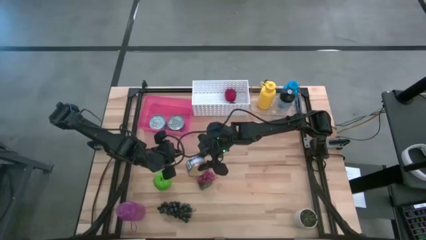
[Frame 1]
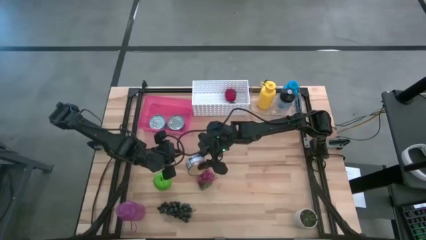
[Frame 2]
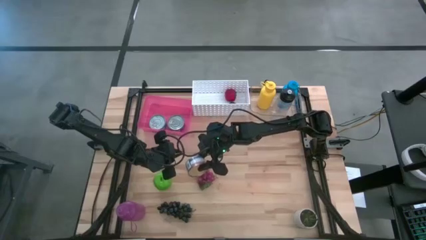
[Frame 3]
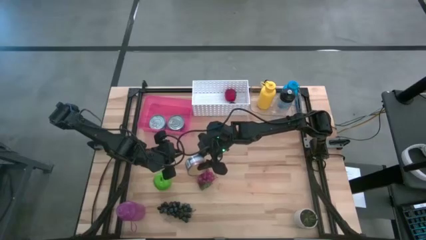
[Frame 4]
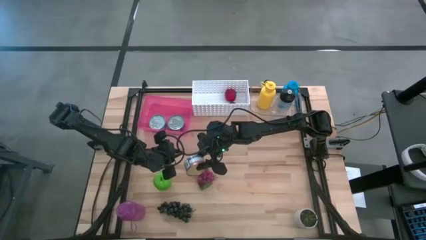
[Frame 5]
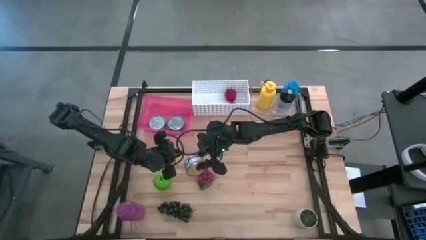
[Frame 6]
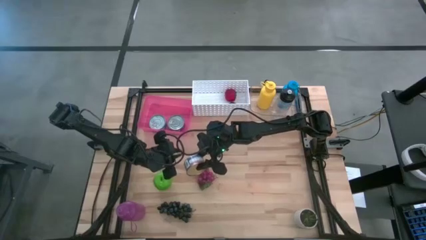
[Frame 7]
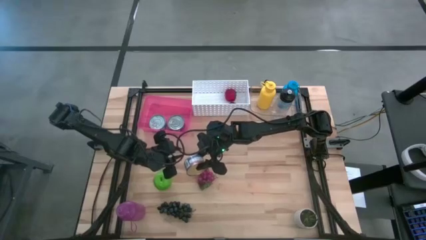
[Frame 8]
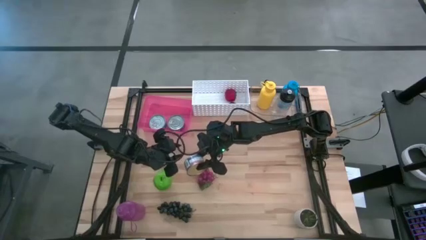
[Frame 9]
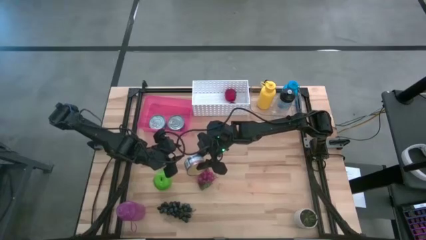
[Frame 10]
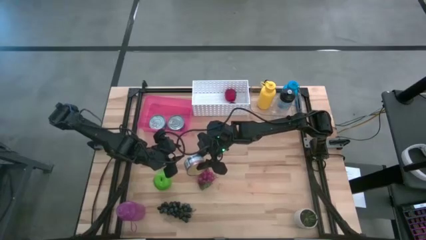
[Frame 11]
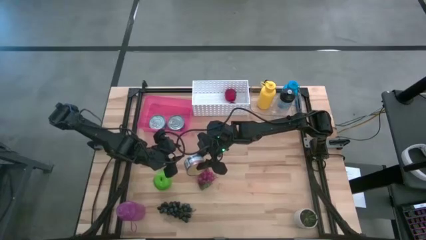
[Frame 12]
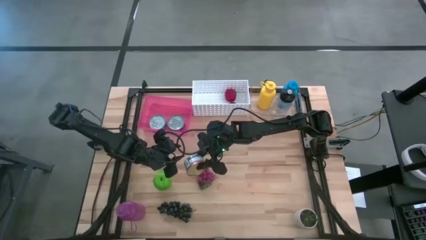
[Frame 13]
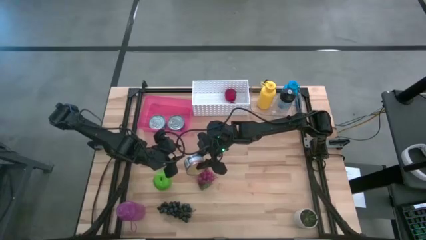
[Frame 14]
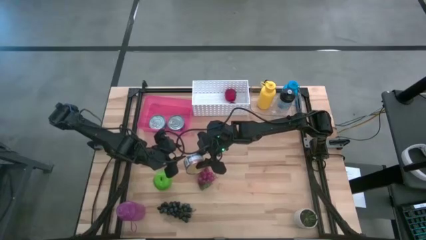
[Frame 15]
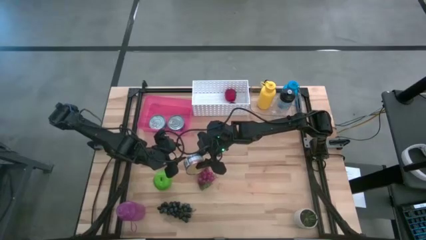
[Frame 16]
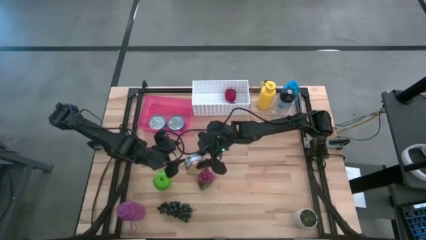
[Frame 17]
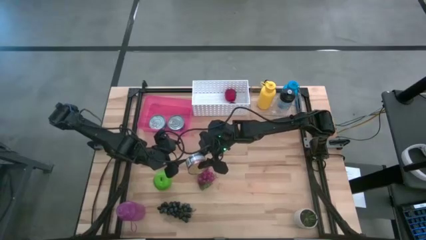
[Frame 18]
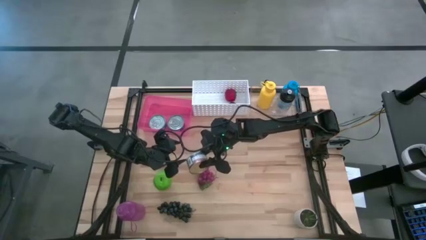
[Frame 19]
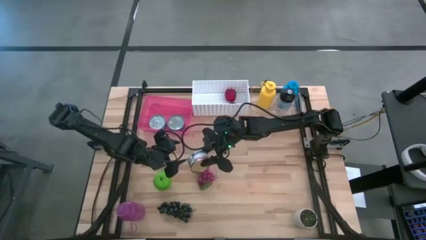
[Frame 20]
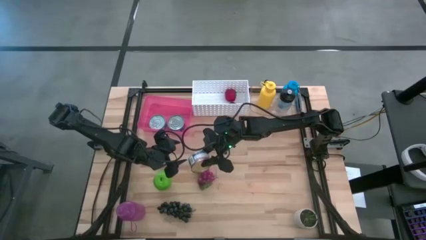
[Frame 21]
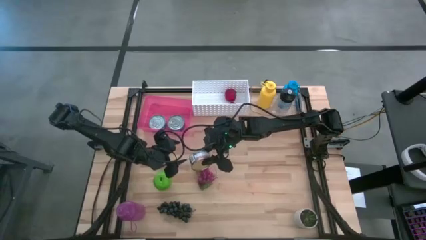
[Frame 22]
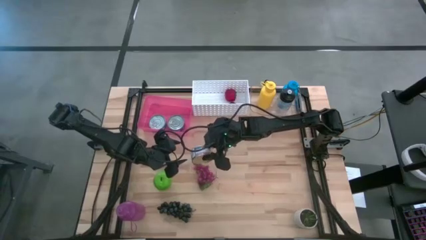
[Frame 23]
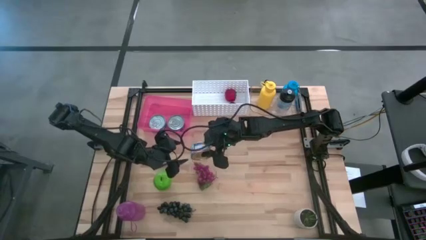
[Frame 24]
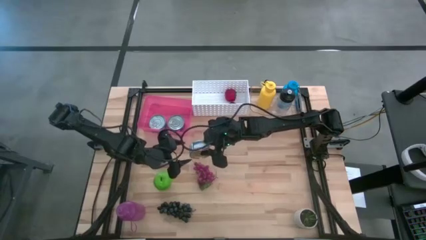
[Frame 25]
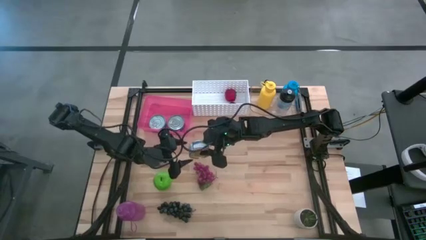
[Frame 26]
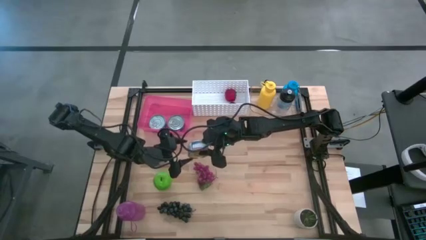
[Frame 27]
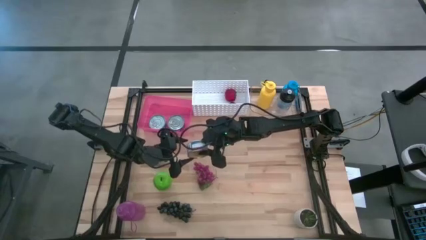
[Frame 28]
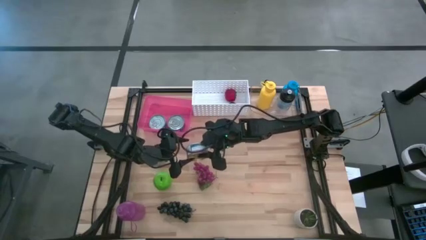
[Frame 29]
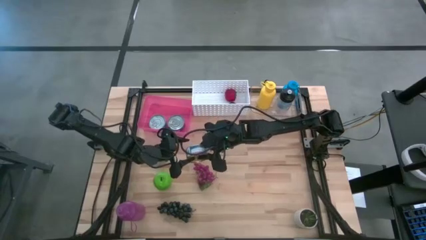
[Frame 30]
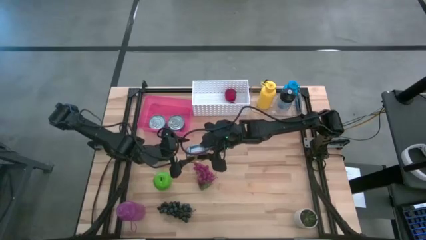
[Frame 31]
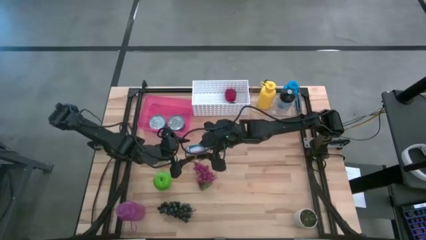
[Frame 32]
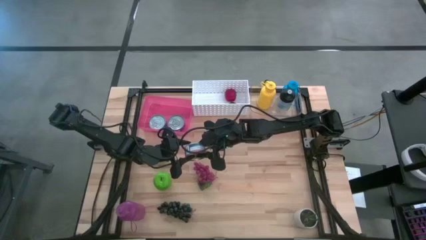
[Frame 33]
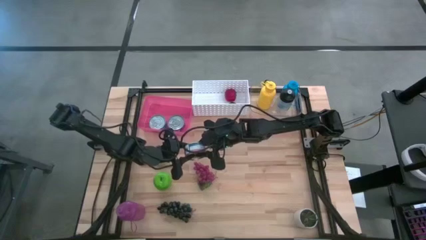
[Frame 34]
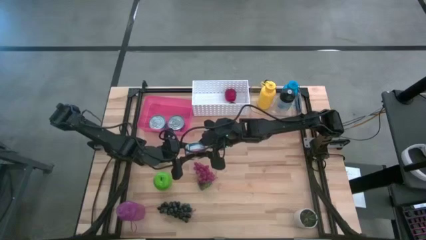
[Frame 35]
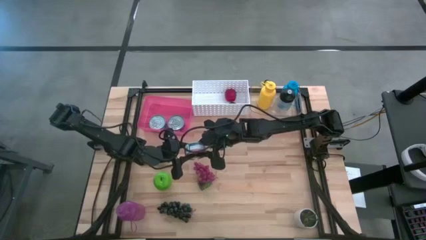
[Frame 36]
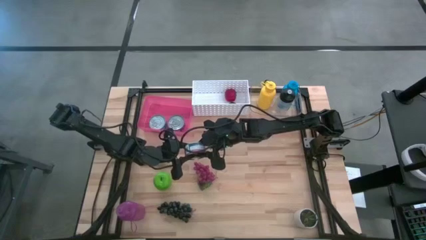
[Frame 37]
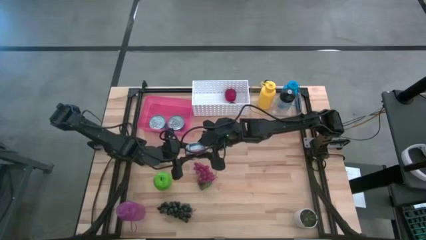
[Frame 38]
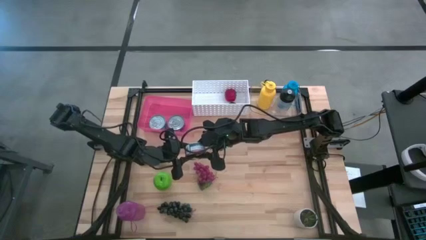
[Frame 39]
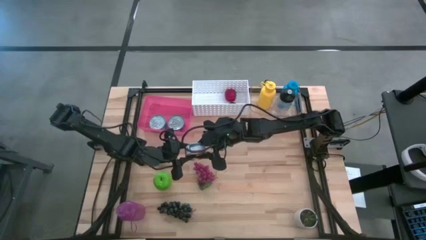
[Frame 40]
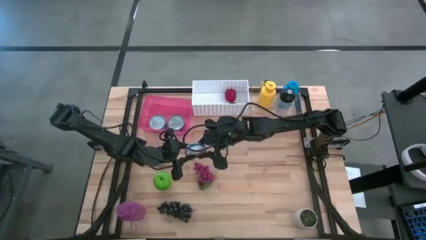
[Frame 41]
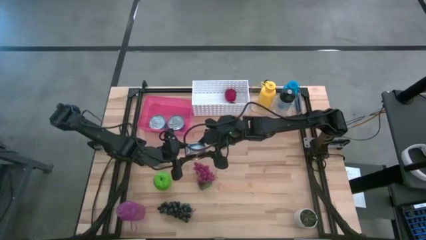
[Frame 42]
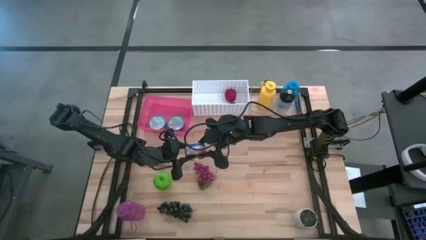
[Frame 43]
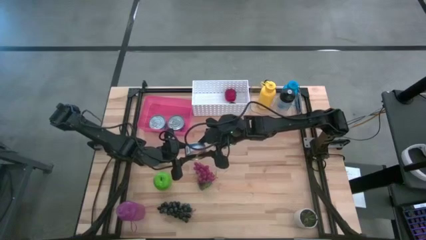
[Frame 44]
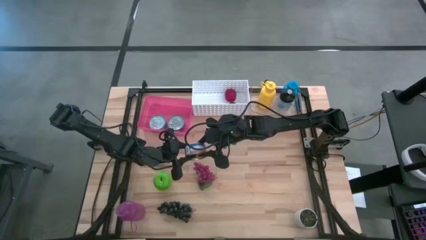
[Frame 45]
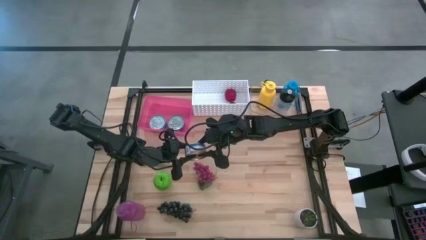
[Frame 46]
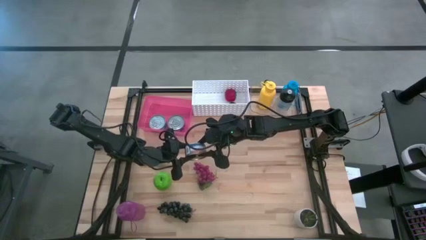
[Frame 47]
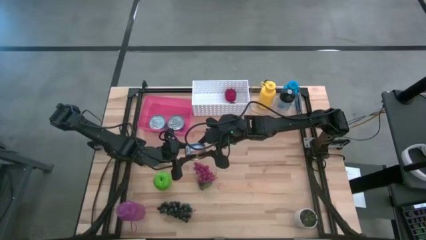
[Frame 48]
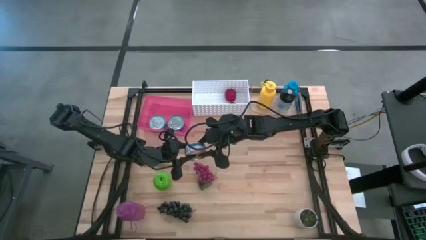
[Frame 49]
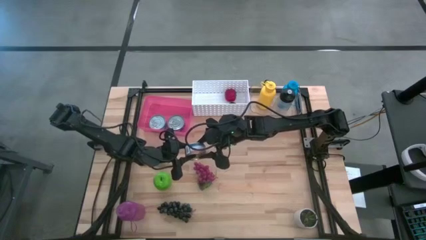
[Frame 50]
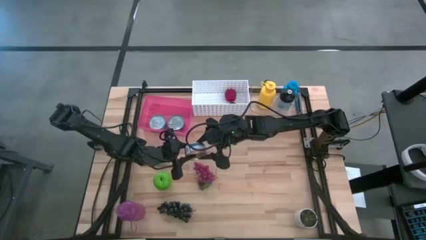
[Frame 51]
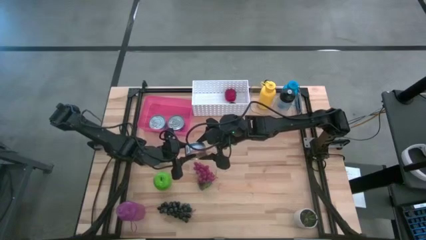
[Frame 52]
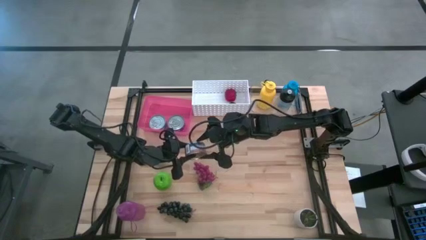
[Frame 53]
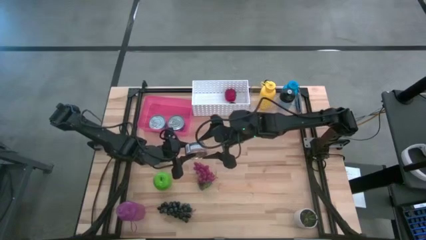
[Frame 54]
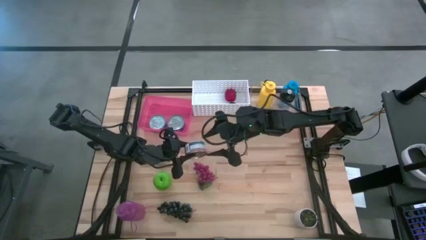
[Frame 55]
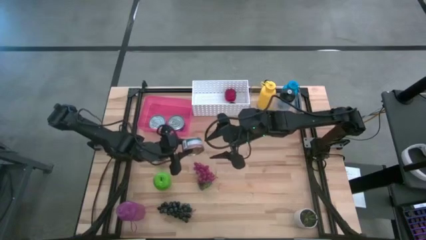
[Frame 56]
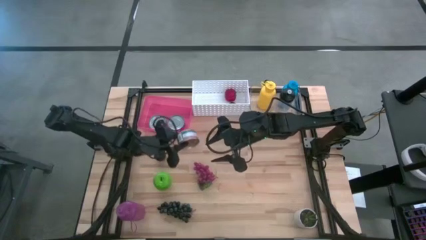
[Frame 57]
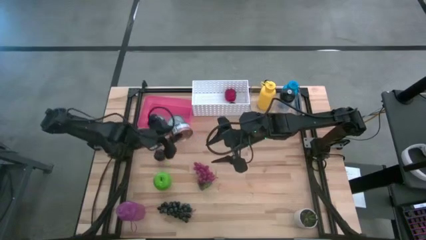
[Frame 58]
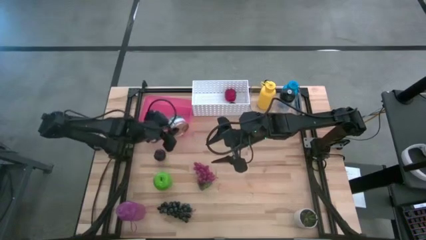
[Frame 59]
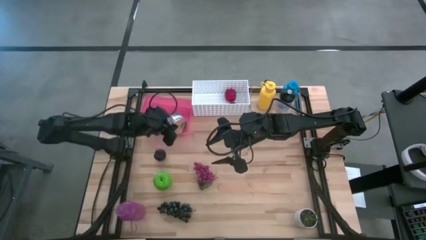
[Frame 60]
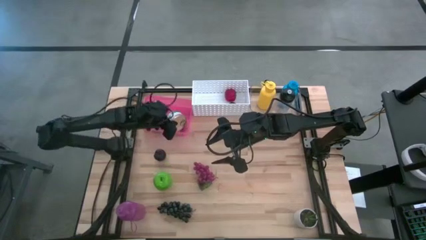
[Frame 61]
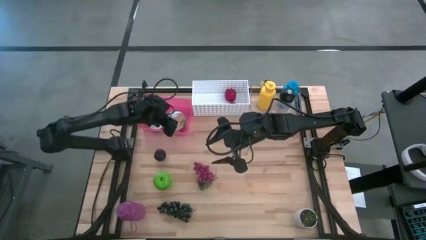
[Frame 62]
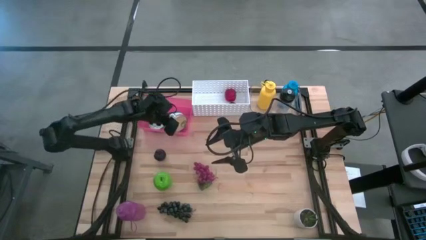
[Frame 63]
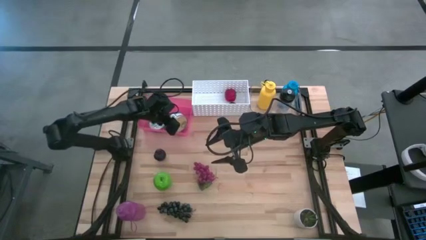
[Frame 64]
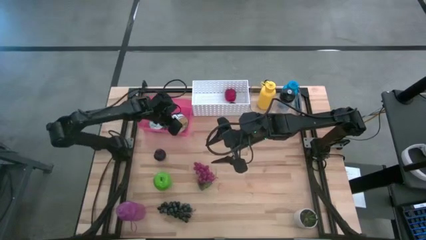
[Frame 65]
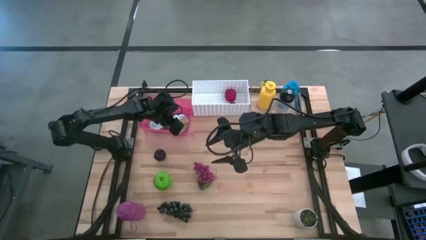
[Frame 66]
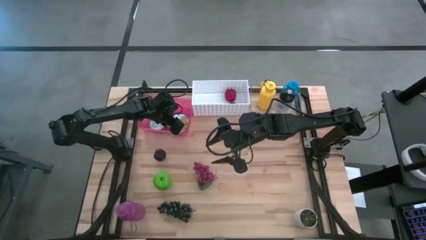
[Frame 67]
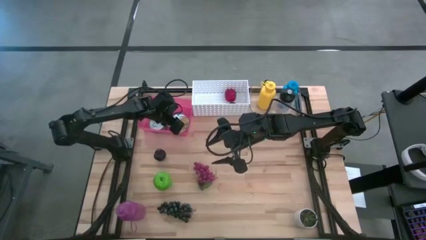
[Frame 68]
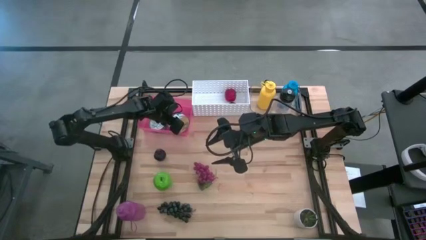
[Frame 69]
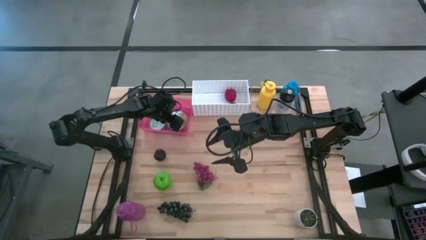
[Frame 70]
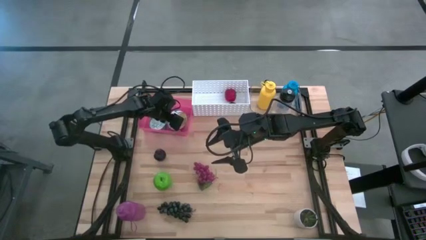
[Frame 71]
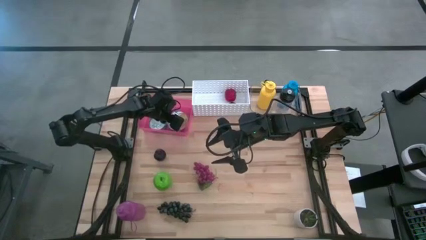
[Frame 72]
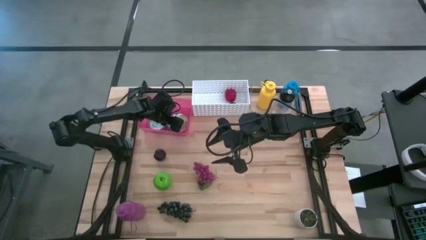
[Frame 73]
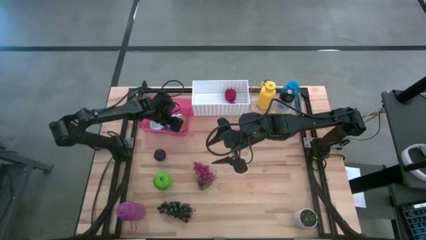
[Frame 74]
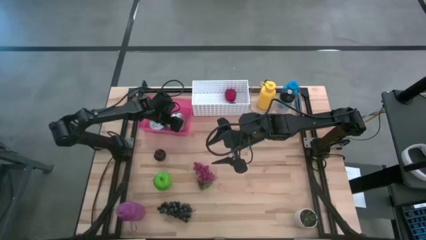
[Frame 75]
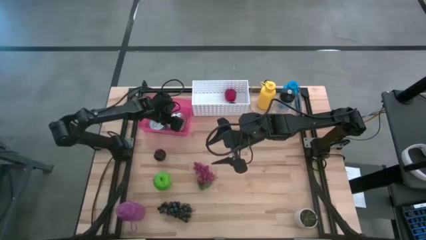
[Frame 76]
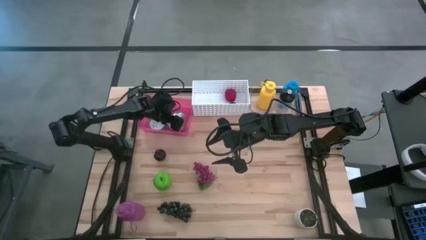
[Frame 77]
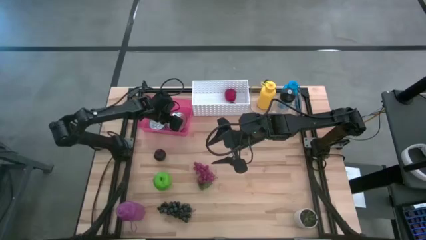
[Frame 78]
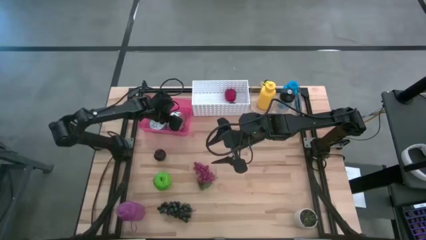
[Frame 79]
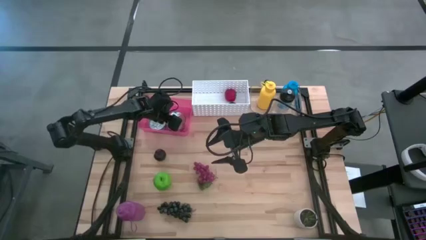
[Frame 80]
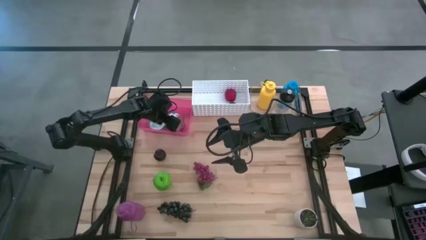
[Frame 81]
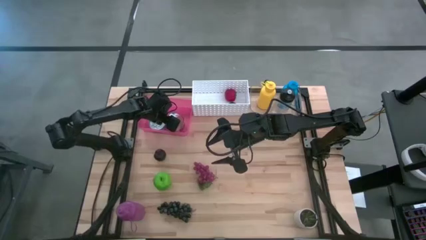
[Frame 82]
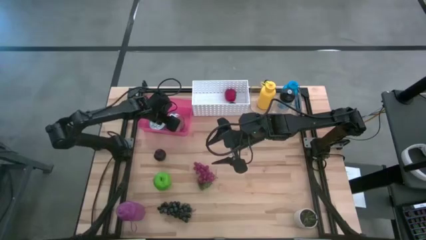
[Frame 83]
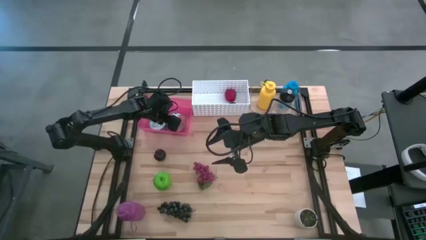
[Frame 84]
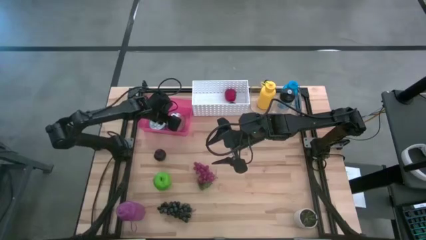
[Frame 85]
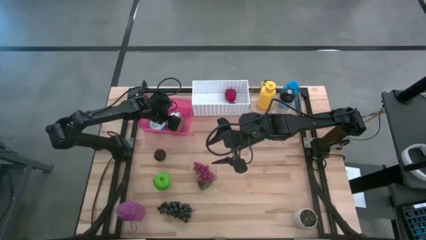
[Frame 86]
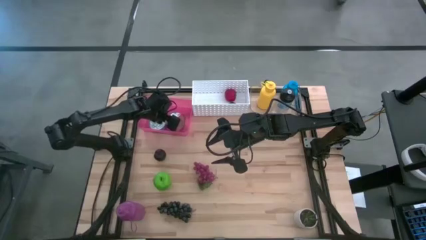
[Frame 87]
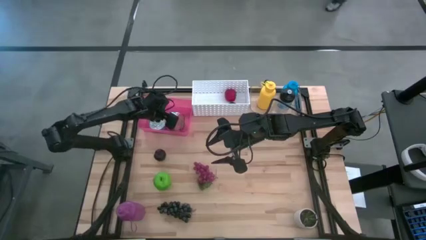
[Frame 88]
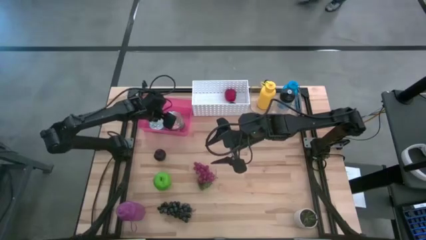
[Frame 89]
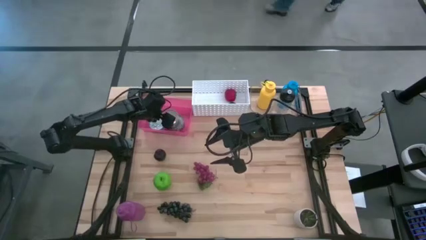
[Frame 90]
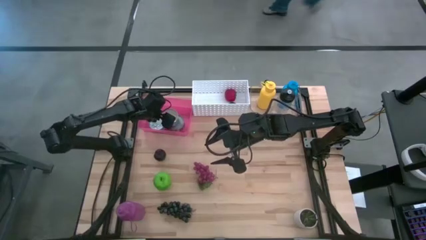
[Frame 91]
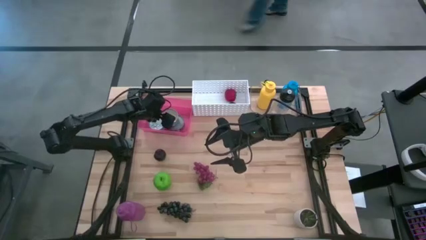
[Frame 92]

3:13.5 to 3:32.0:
Task: Pick & Place Food Item
Put the blue pink tuna can into the pink bin
